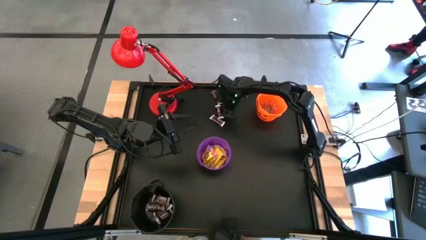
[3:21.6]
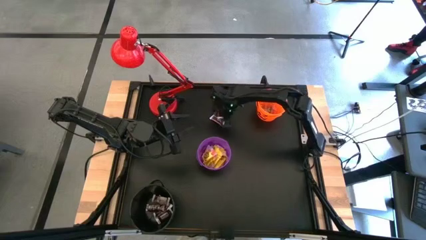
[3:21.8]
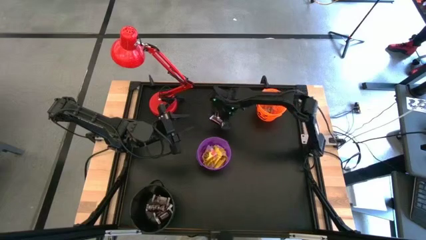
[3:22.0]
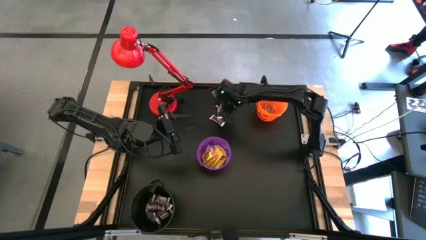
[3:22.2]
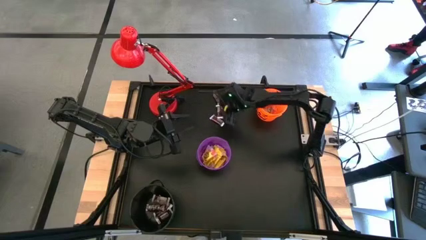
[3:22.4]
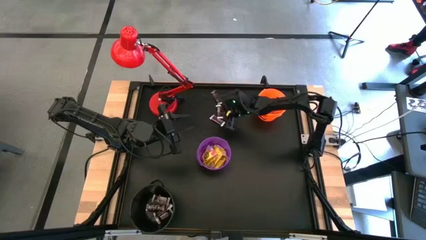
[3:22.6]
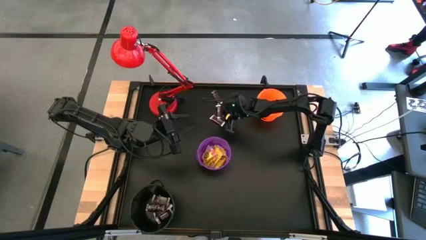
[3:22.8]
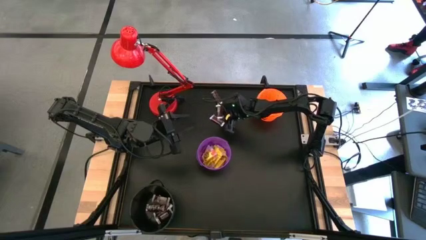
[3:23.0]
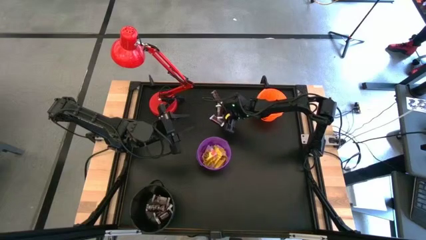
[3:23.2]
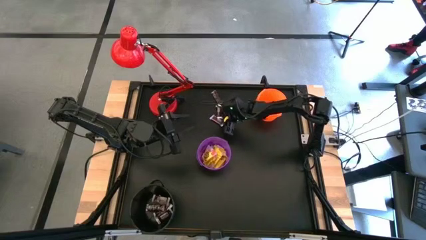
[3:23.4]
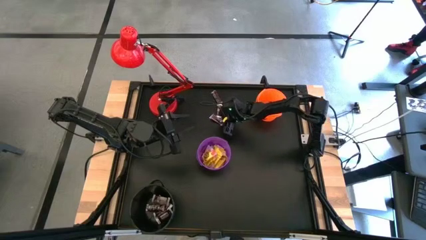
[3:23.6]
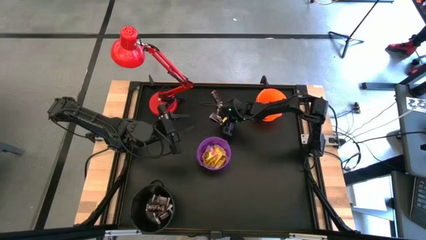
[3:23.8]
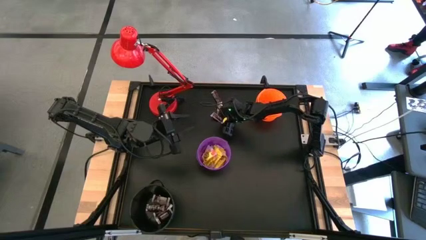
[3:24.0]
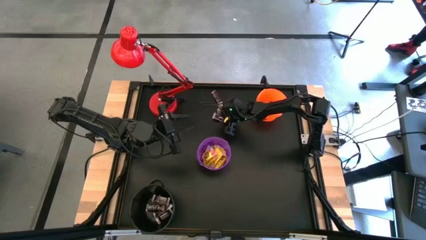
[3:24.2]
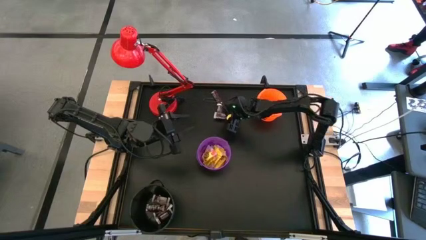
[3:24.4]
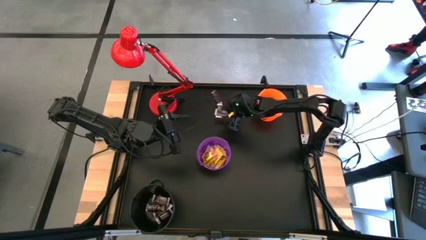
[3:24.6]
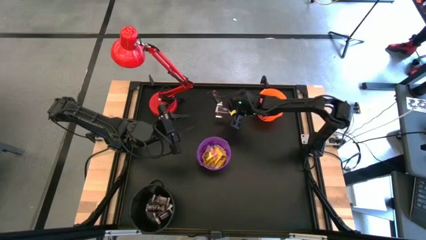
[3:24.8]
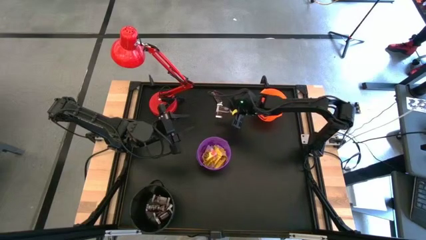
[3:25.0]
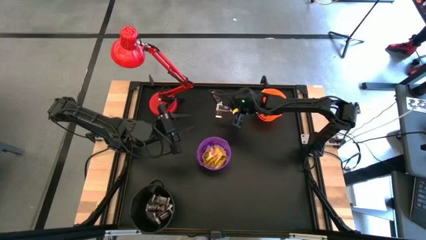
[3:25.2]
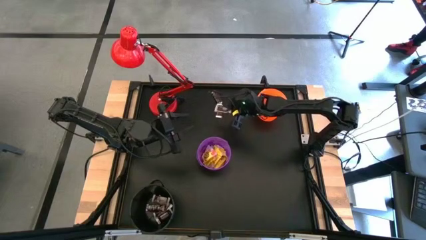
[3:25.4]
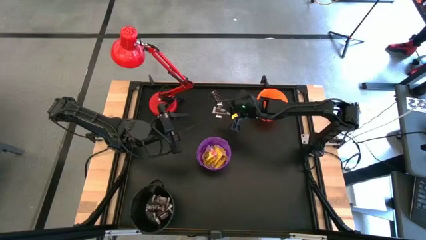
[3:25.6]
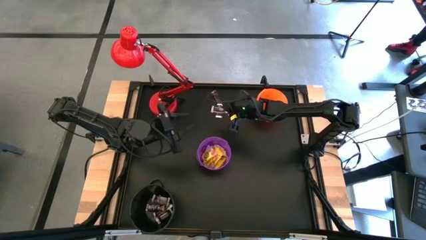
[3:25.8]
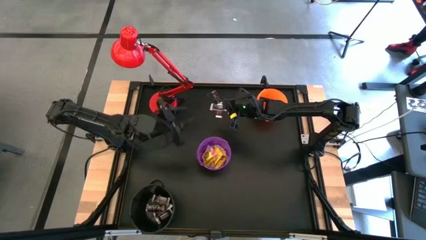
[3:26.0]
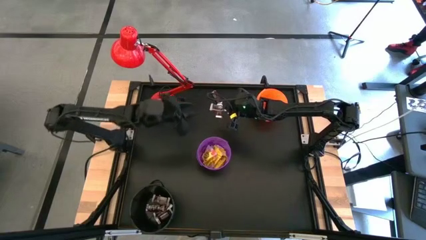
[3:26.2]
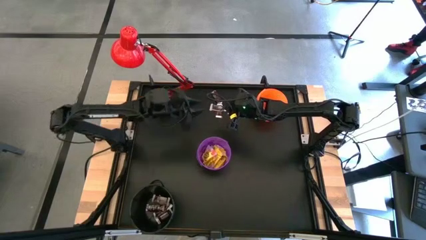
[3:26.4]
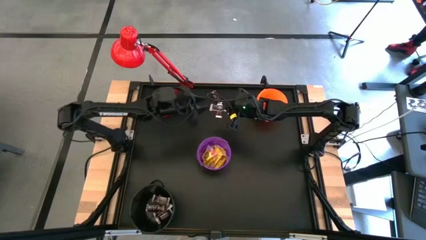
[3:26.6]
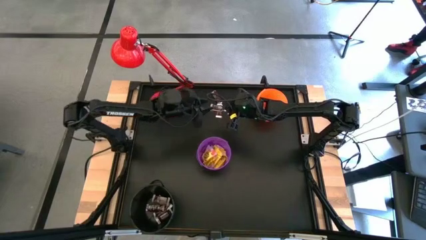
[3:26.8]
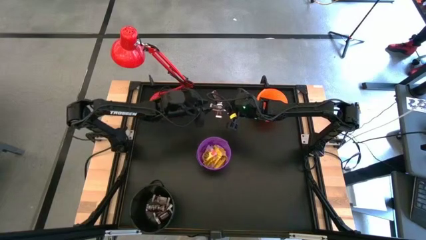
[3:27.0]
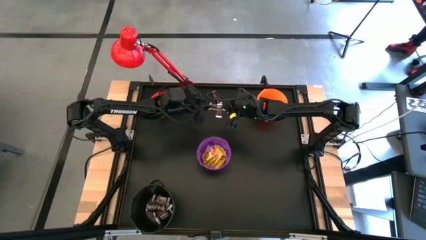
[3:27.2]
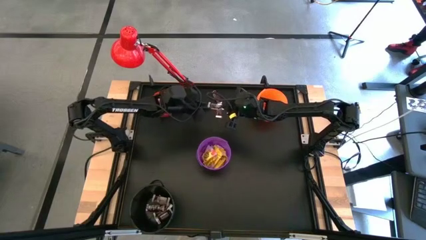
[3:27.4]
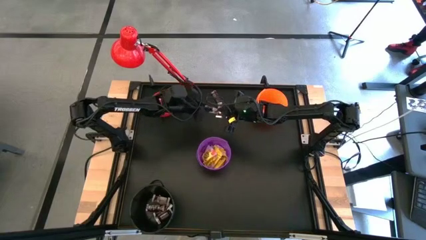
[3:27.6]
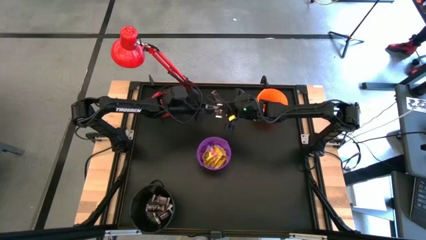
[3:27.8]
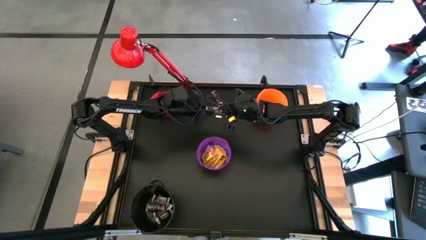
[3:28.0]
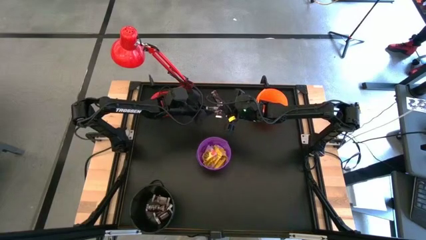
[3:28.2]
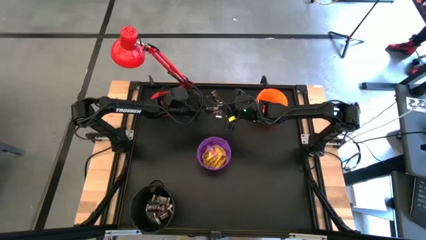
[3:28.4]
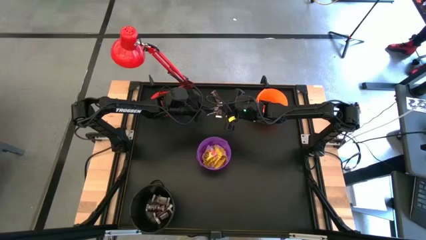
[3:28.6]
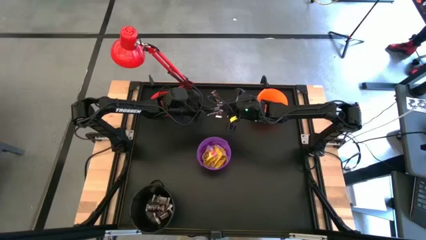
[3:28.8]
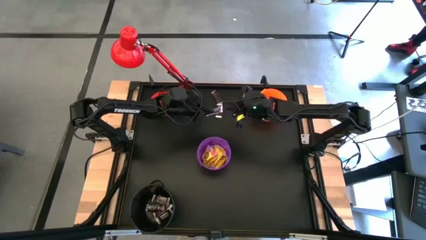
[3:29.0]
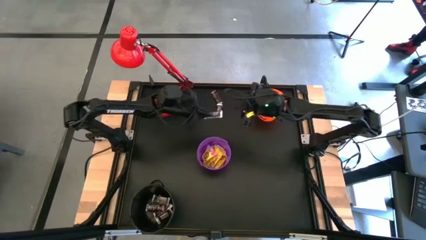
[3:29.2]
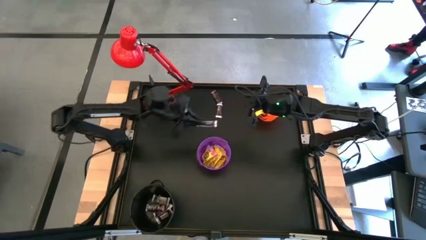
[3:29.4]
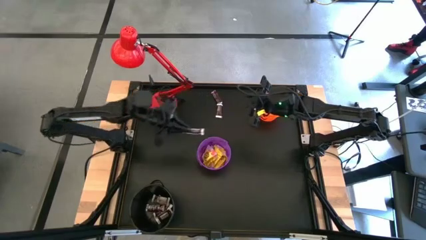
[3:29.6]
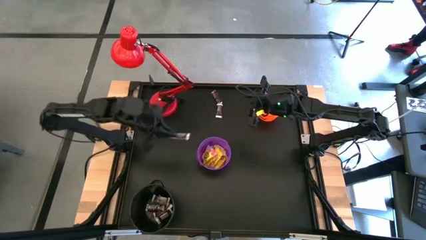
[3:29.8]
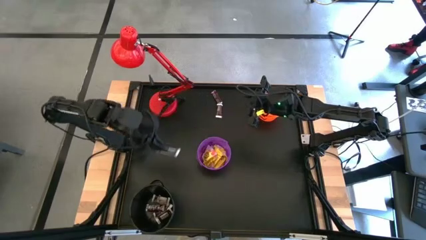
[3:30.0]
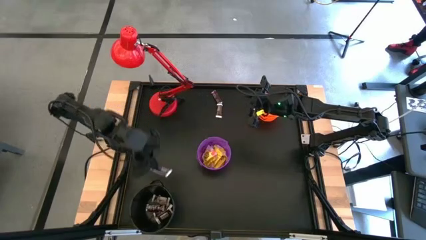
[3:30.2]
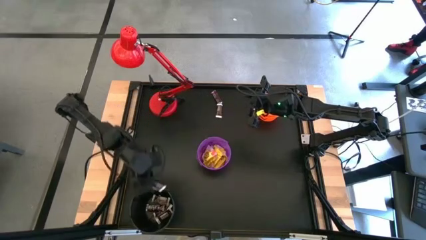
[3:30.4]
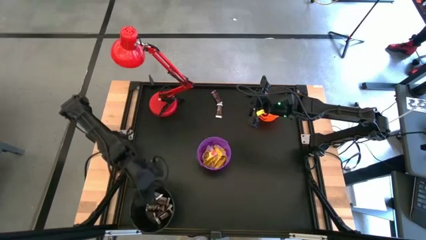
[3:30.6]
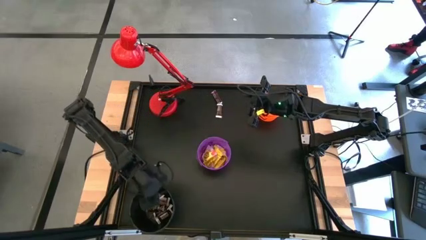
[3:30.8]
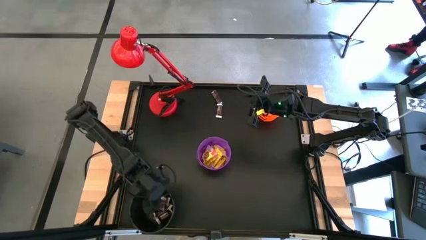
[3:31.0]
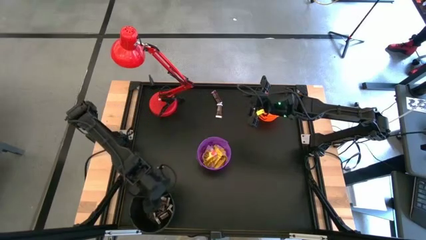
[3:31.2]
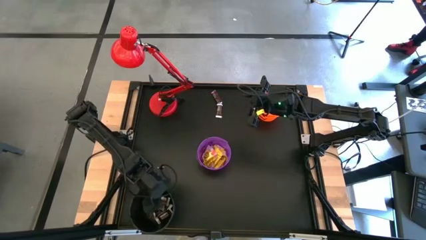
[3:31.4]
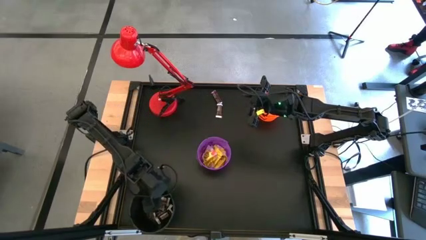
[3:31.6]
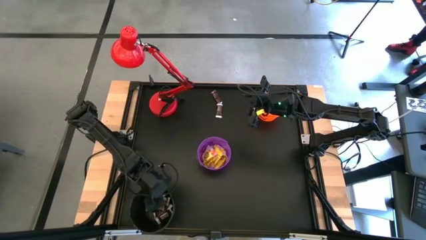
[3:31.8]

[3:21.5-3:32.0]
Task: Sort candy
Put the brown chocolate bar into the black bucket

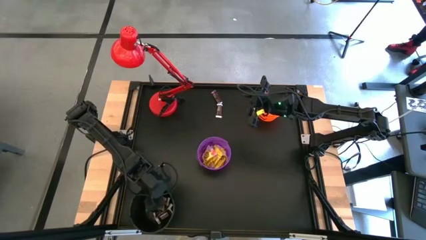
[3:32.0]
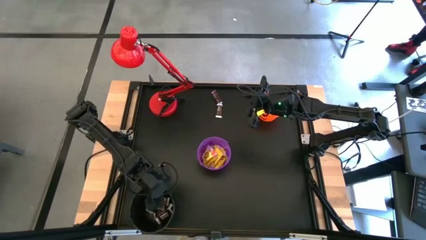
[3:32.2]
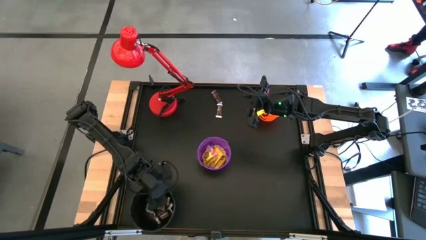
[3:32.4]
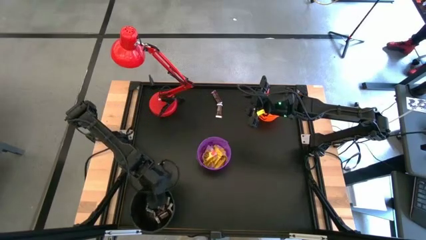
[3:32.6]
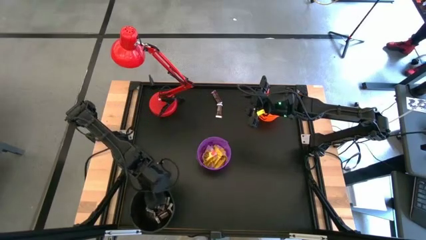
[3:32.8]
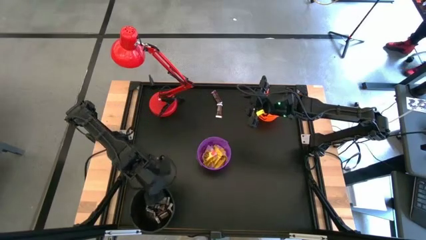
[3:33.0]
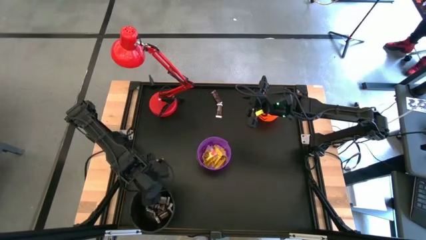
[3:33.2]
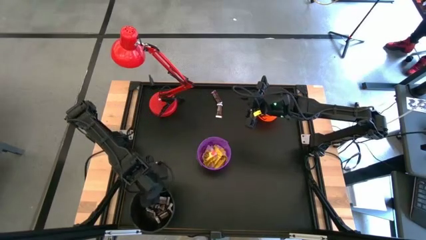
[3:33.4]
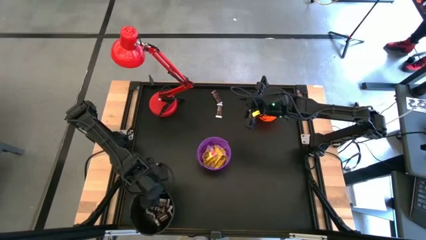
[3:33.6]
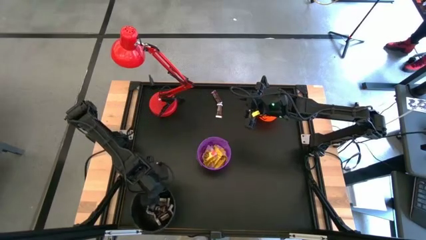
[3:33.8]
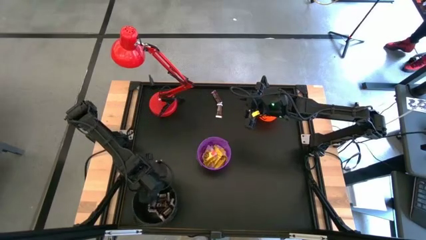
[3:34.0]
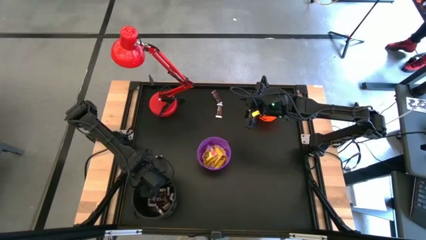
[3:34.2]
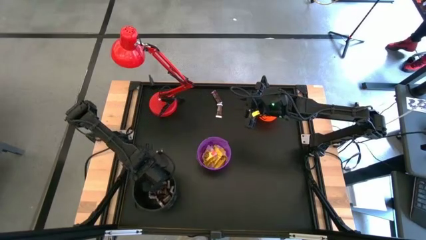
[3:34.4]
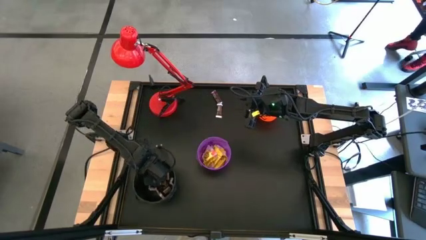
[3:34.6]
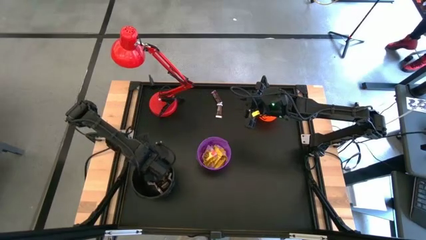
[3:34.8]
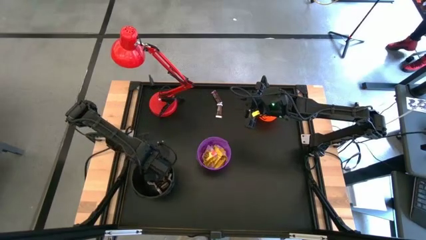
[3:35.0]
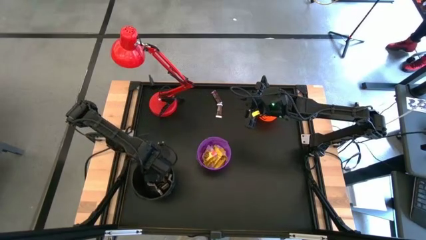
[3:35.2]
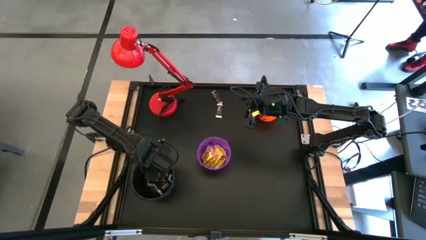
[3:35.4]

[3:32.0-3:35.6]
Adjust the black bucket
